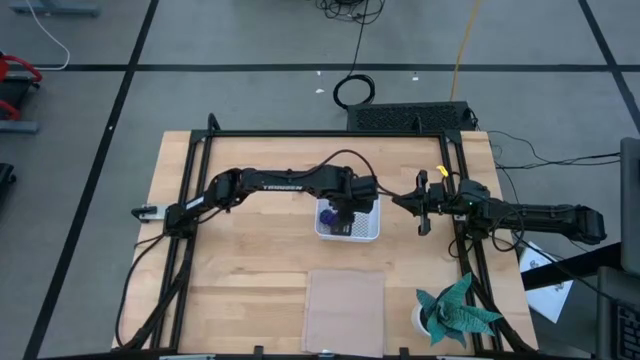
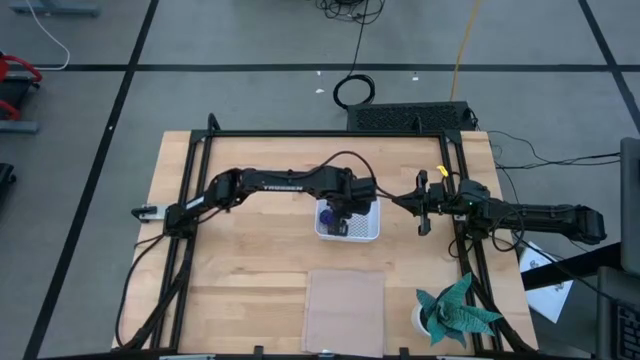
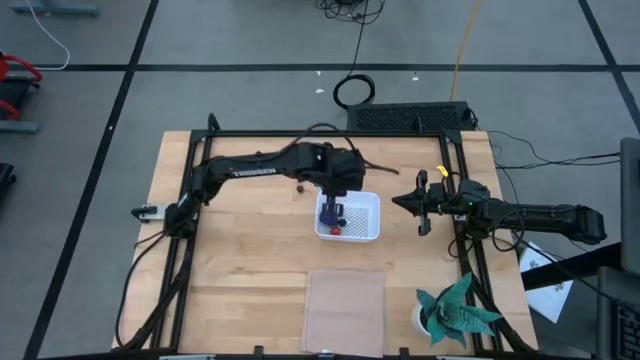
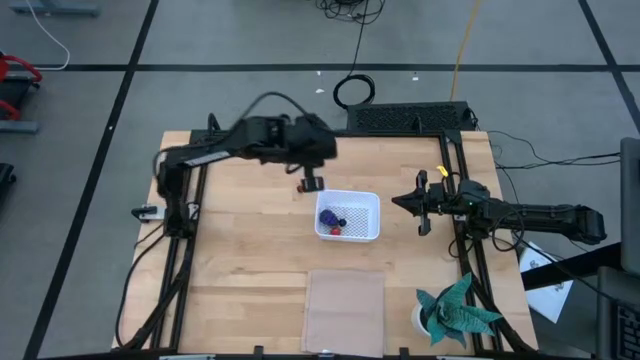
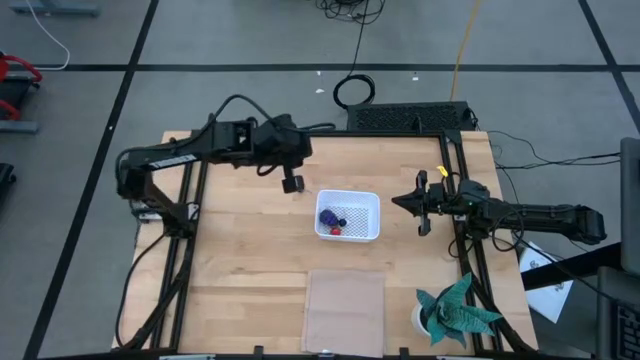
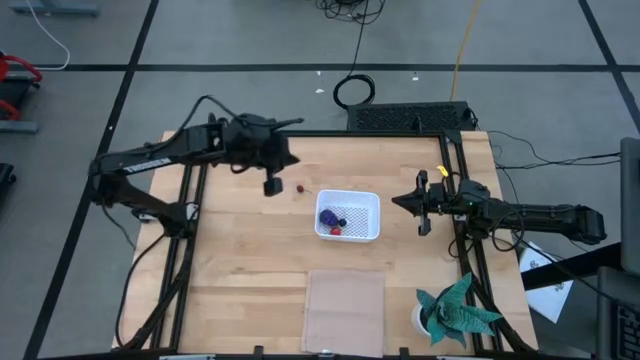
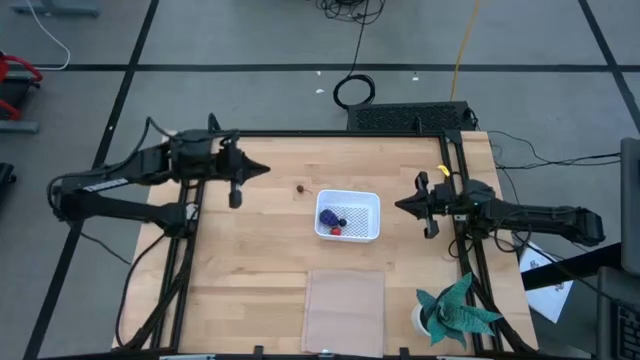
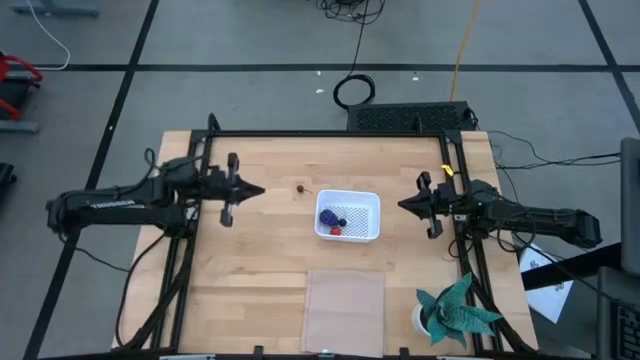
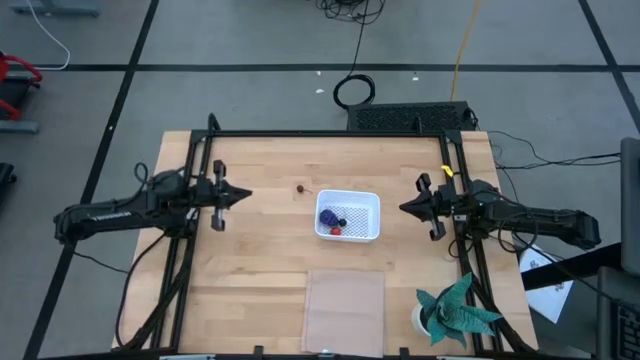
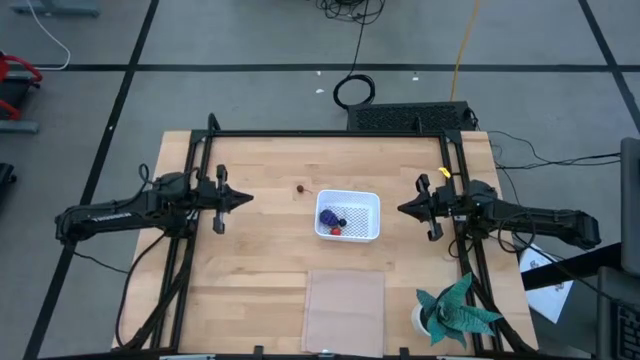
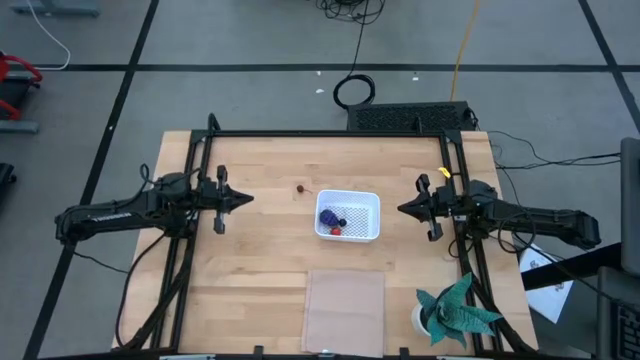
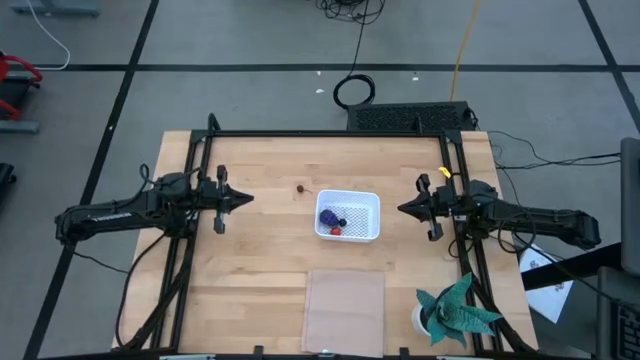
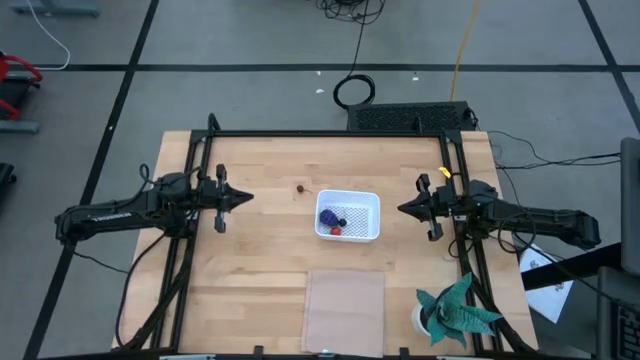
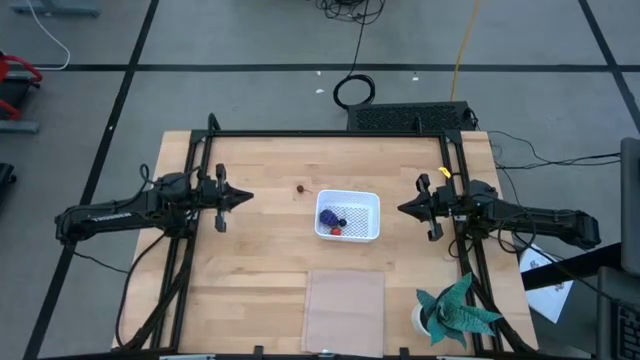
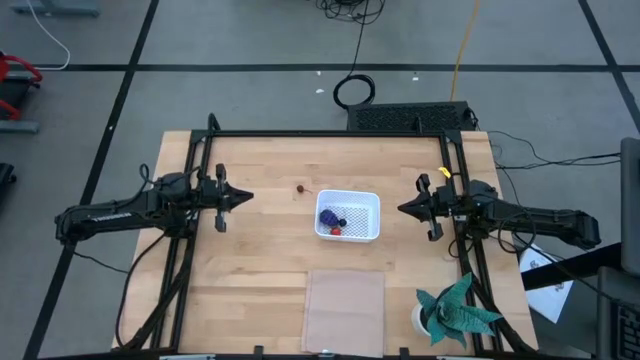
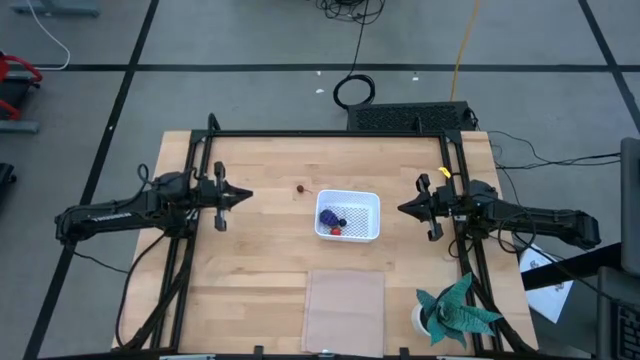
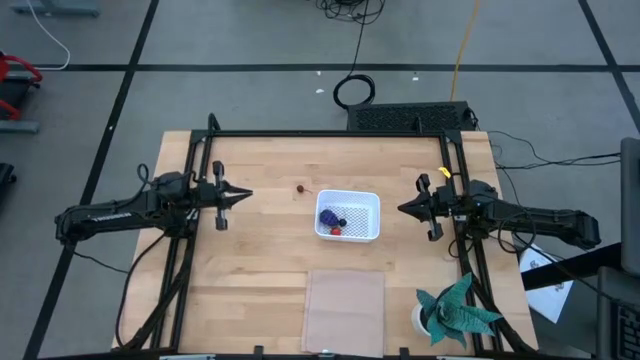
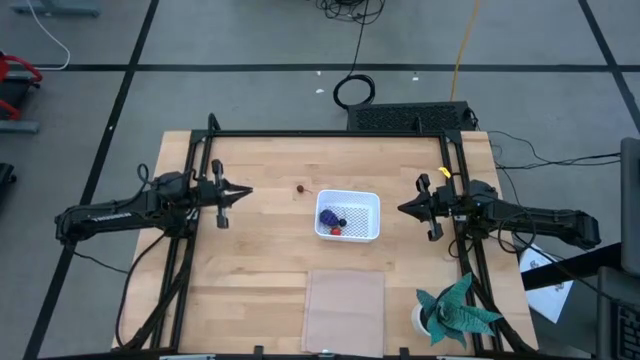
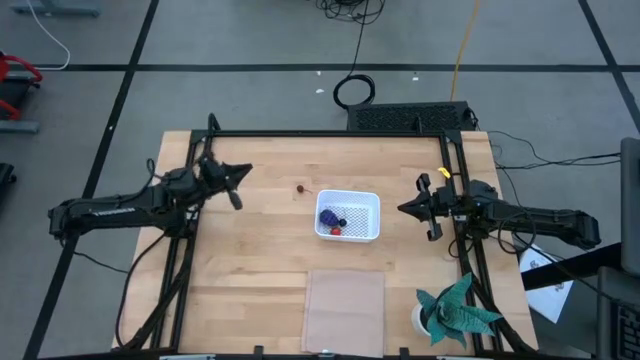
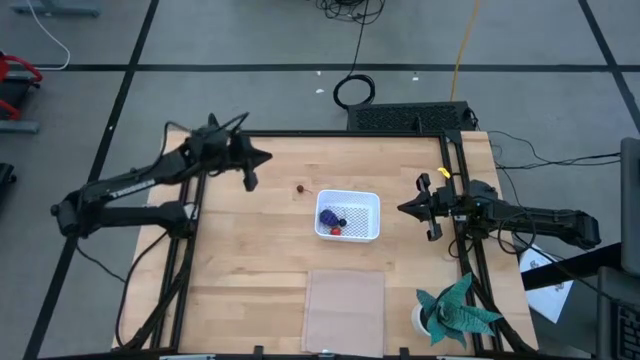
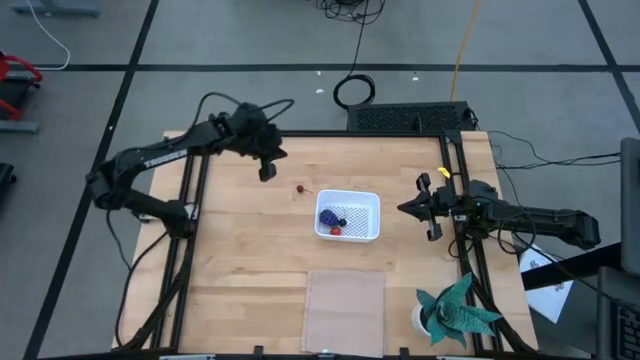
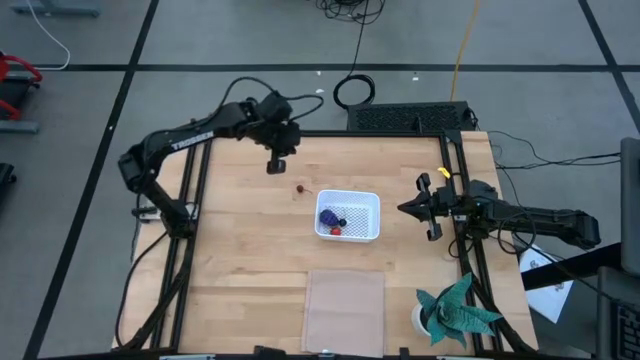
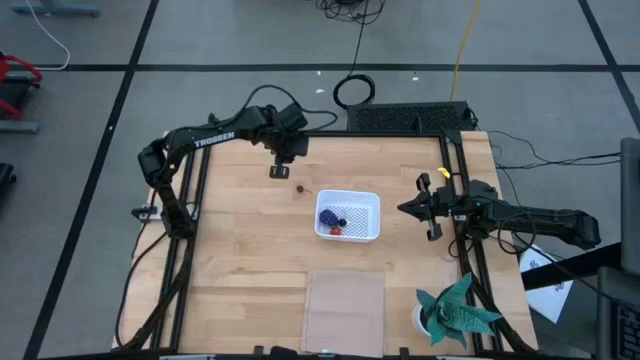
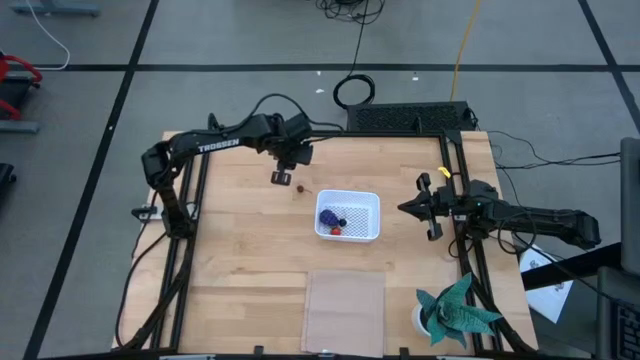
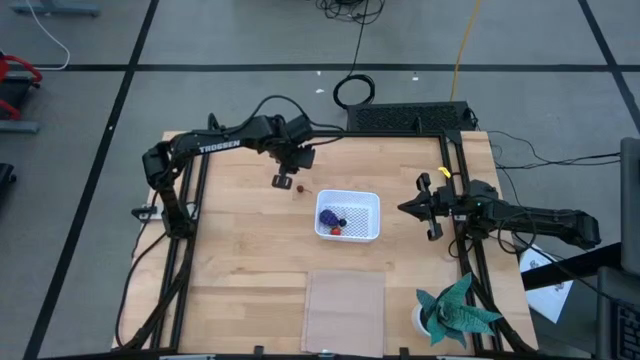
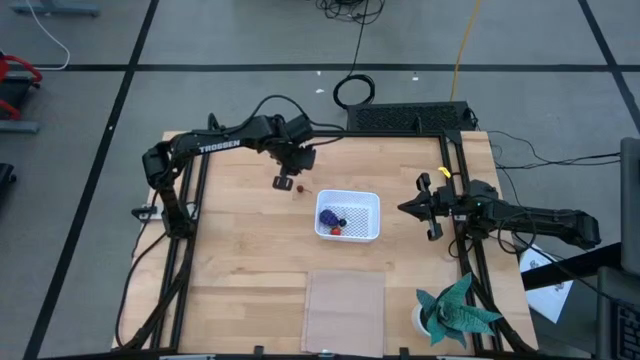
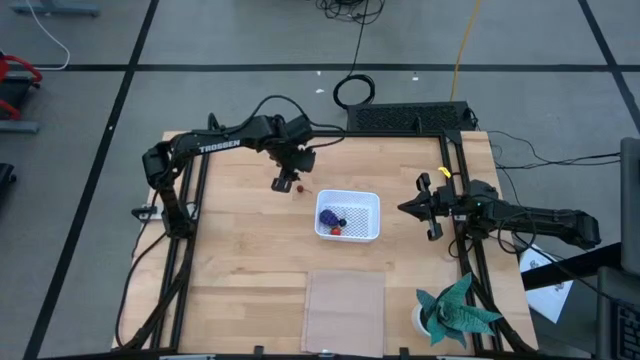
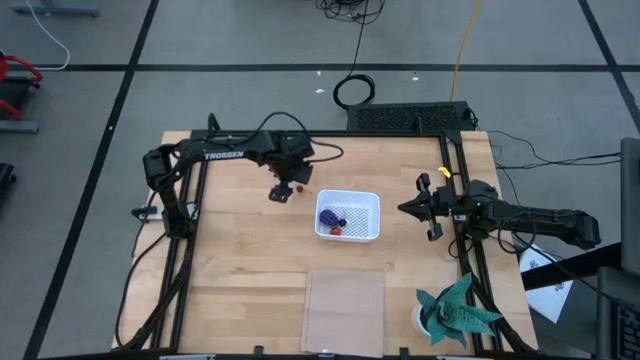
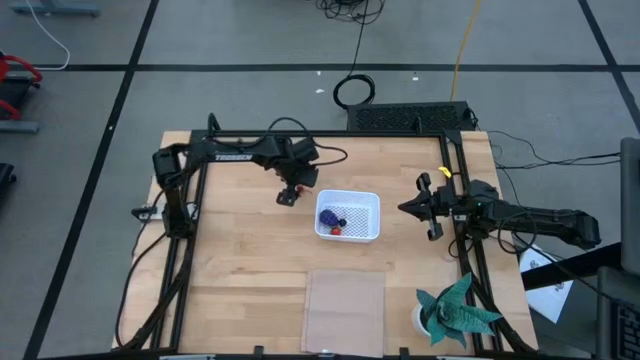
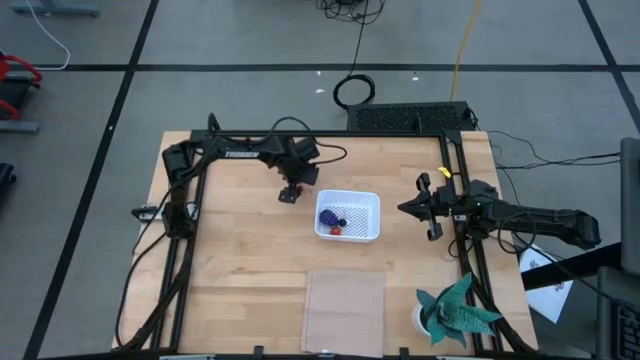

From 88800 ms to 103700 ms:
Task: Pick and placing Produce into tupperware
Put the red cherry into the white basket

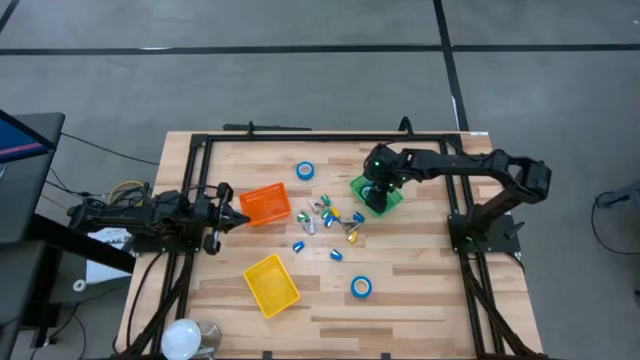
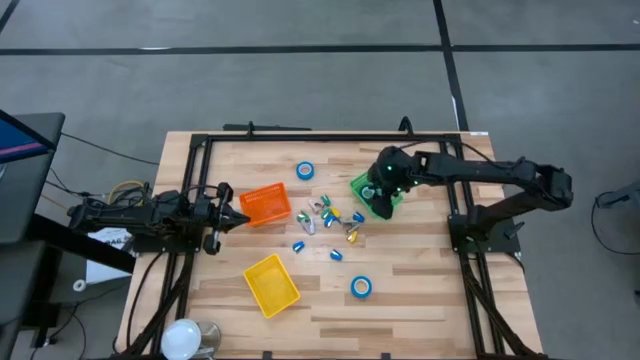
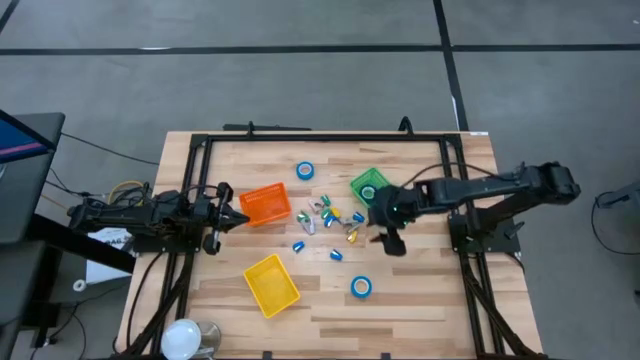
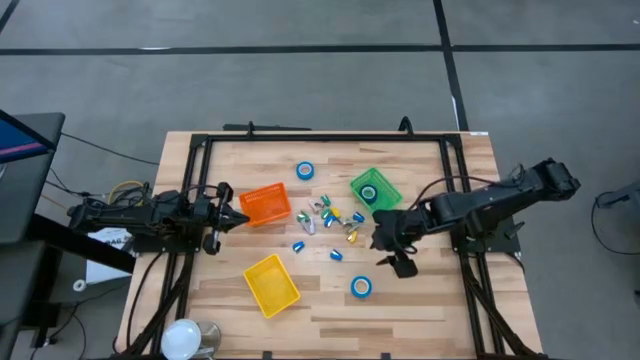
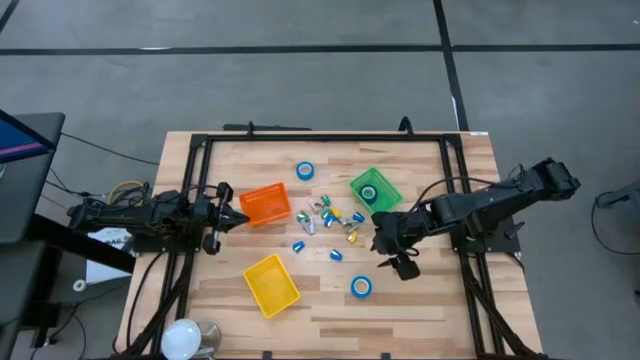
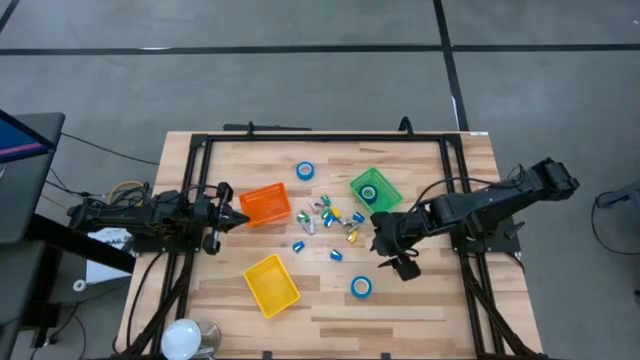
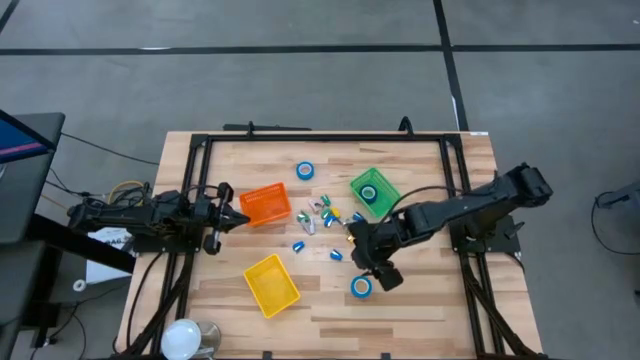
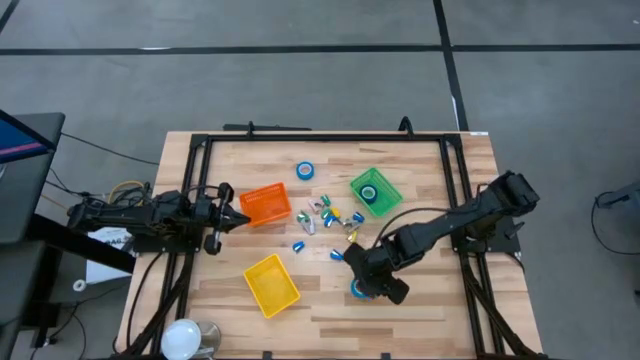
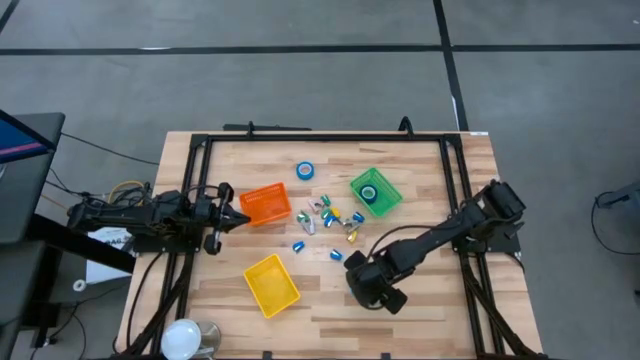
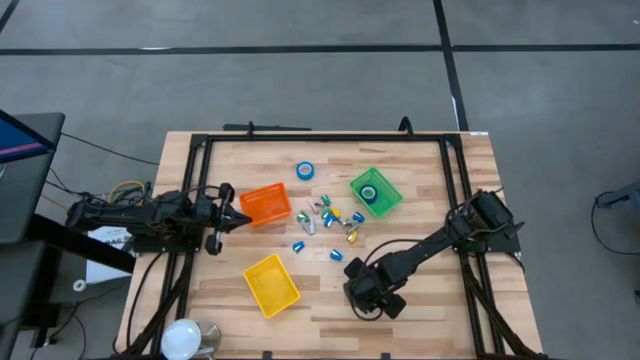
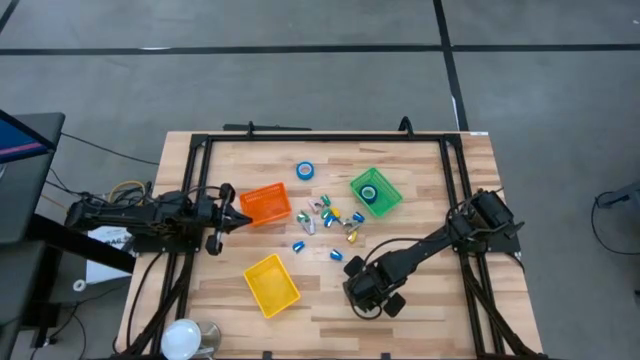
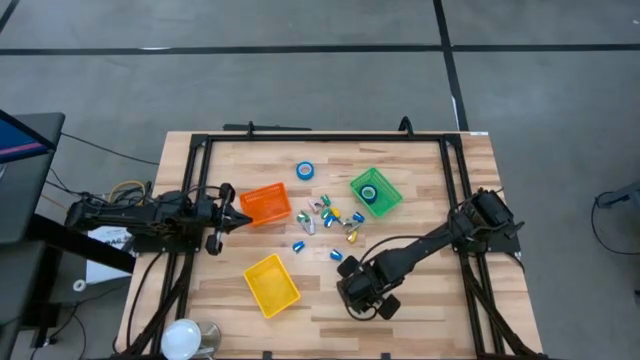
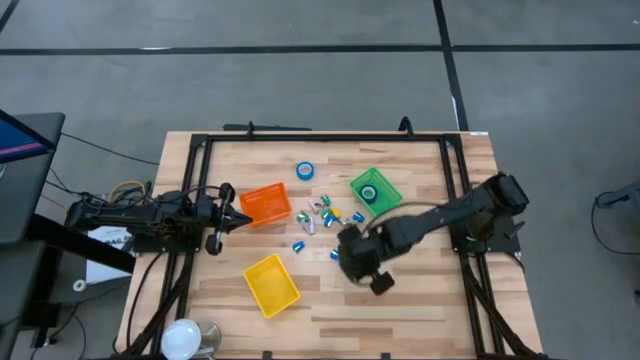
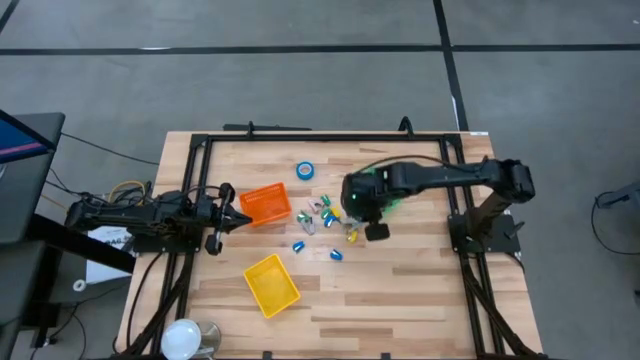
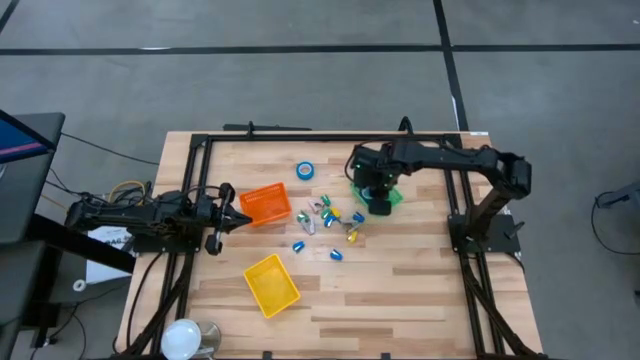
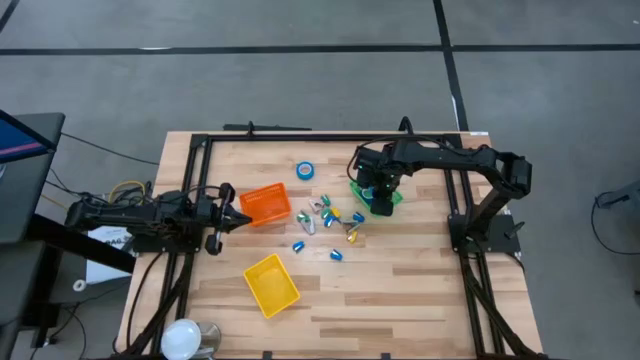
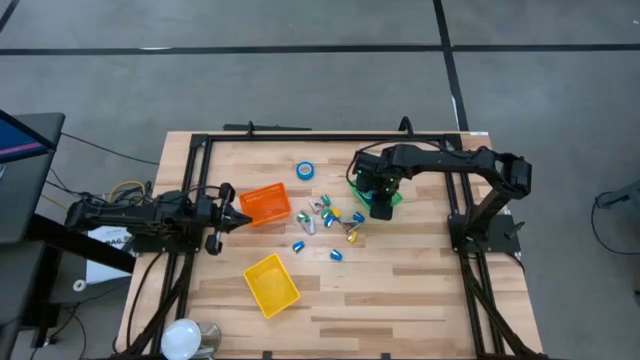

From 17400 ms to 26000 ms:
Task: Pick and place Stapler, Stapler remover, tape
Put the blue tape into the green basket
